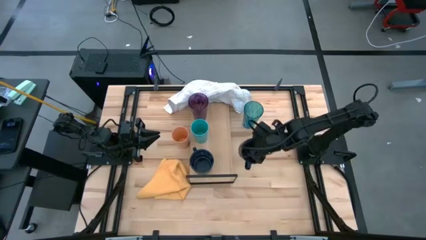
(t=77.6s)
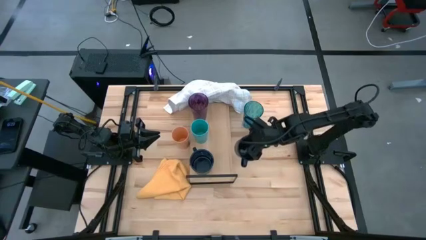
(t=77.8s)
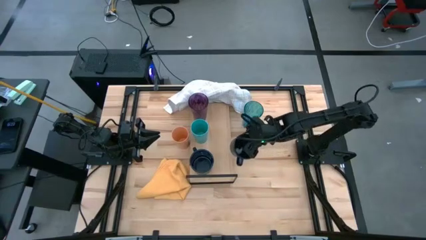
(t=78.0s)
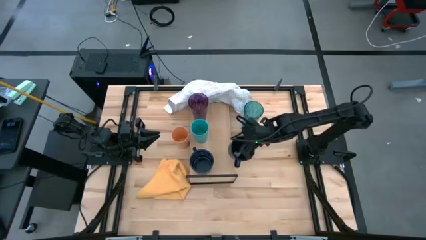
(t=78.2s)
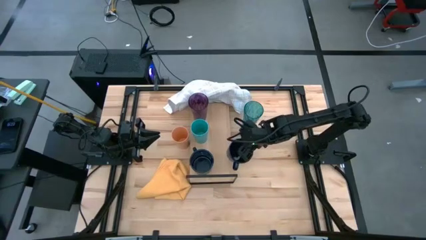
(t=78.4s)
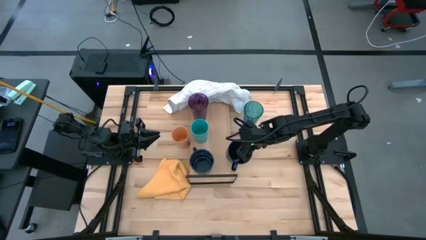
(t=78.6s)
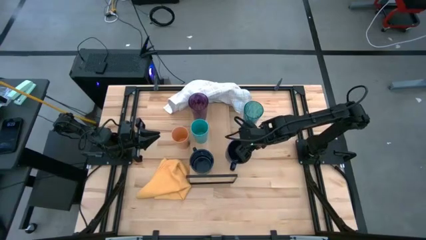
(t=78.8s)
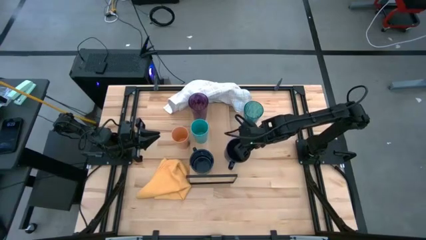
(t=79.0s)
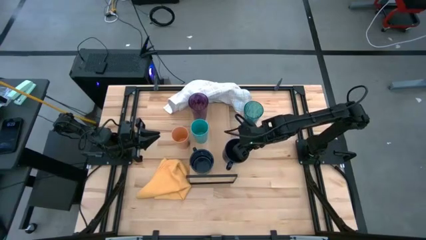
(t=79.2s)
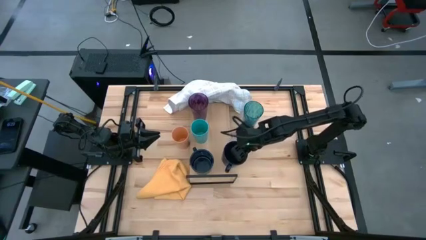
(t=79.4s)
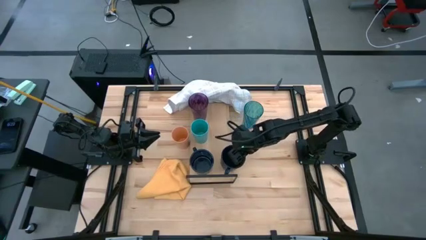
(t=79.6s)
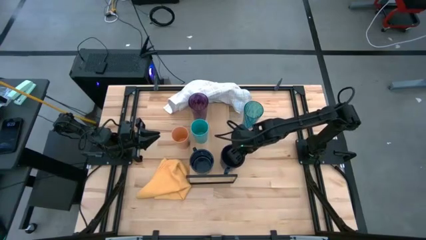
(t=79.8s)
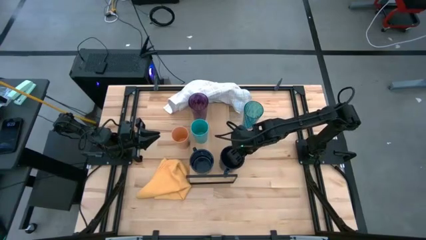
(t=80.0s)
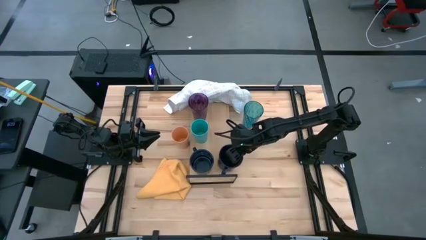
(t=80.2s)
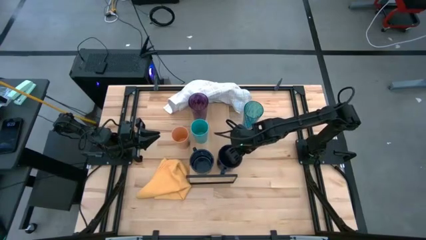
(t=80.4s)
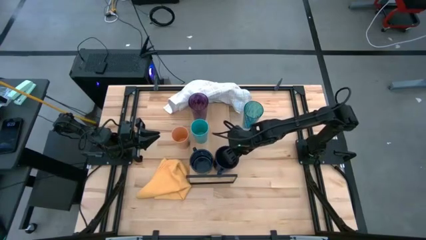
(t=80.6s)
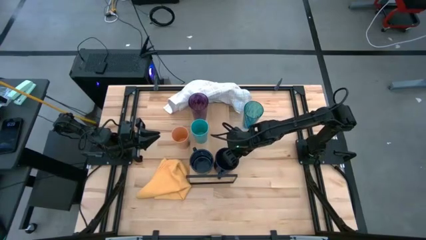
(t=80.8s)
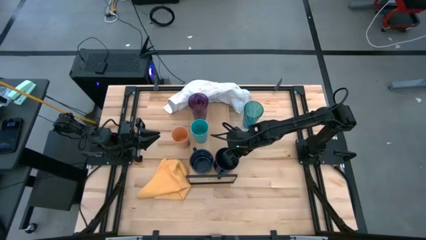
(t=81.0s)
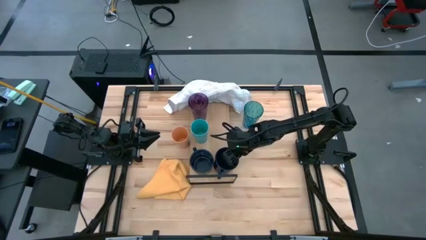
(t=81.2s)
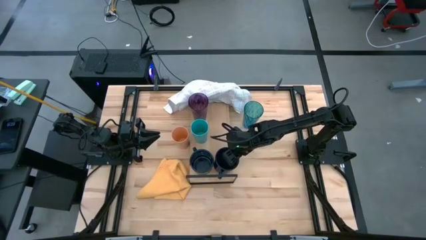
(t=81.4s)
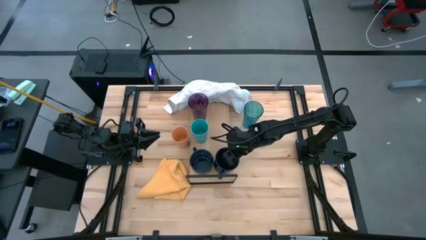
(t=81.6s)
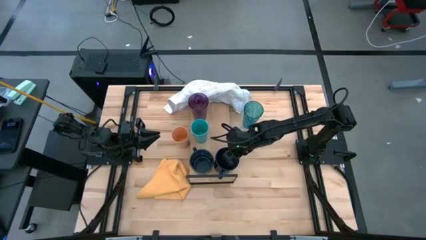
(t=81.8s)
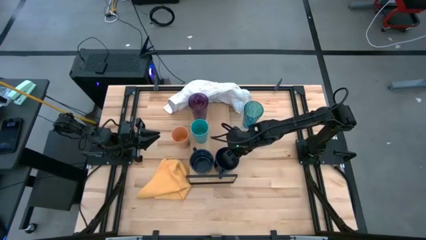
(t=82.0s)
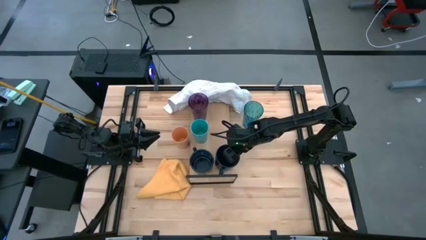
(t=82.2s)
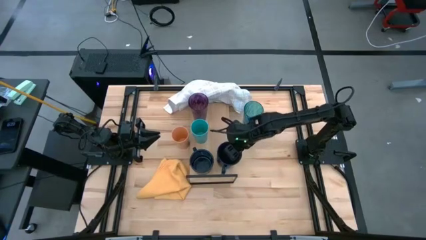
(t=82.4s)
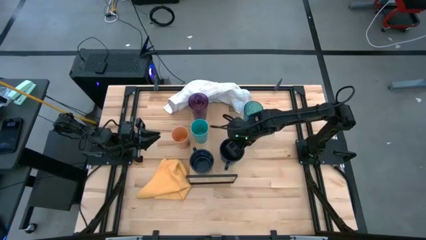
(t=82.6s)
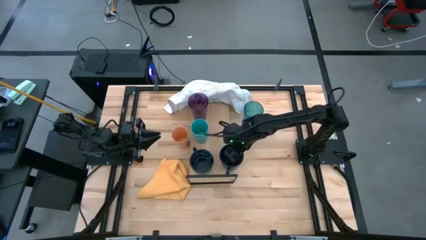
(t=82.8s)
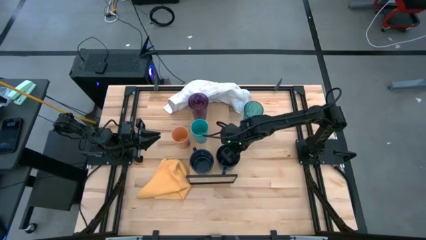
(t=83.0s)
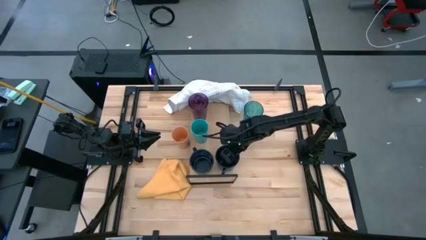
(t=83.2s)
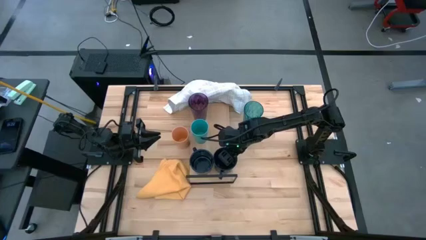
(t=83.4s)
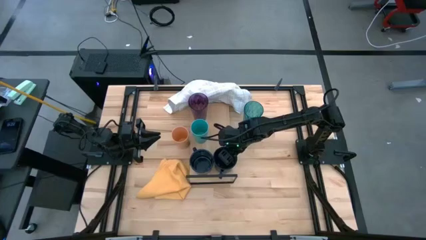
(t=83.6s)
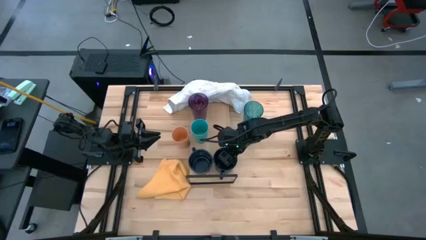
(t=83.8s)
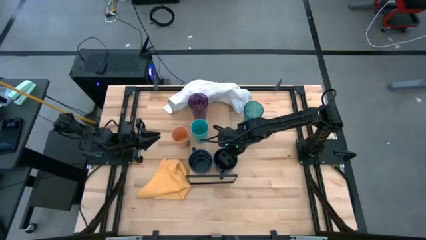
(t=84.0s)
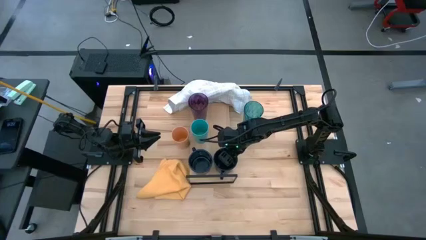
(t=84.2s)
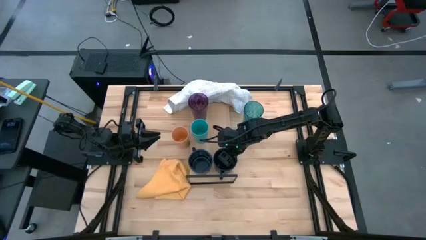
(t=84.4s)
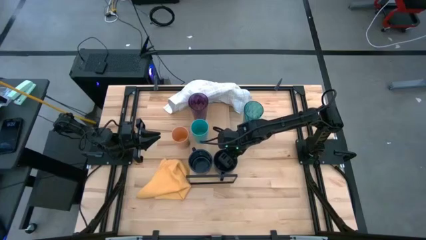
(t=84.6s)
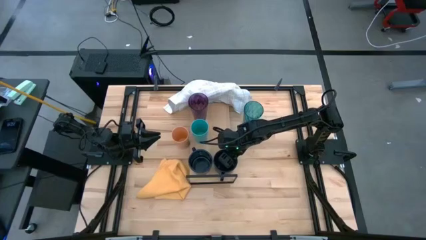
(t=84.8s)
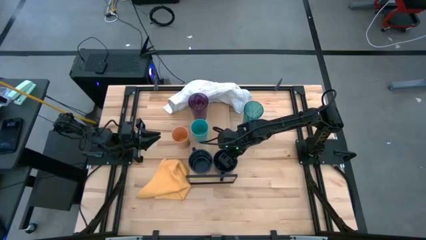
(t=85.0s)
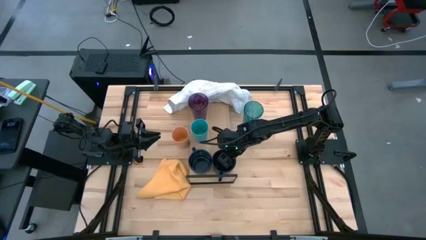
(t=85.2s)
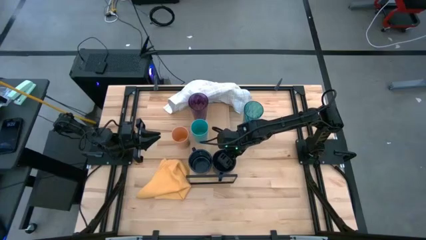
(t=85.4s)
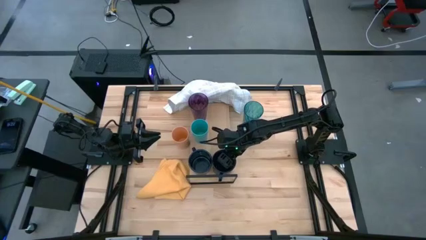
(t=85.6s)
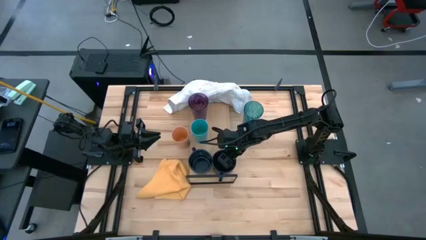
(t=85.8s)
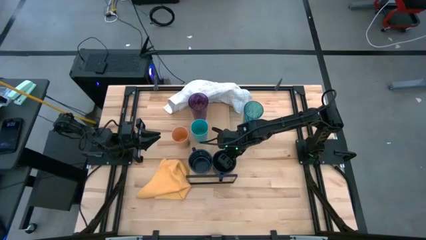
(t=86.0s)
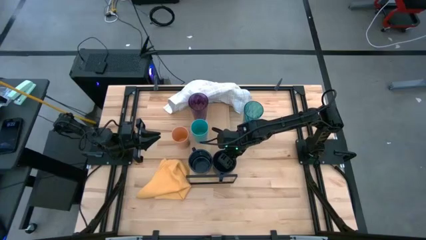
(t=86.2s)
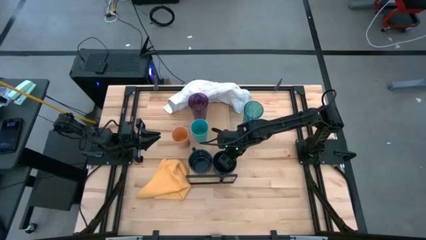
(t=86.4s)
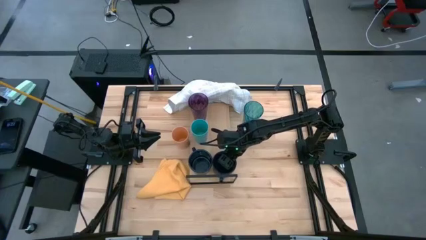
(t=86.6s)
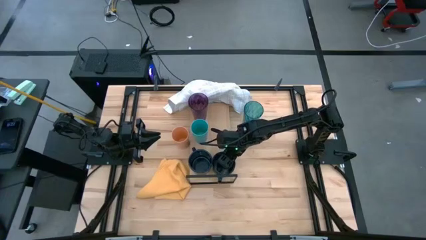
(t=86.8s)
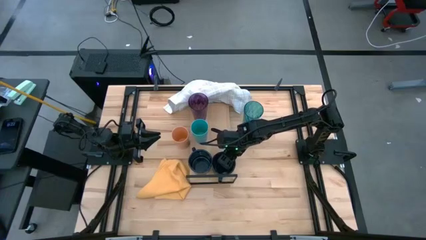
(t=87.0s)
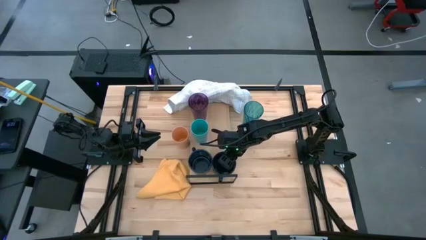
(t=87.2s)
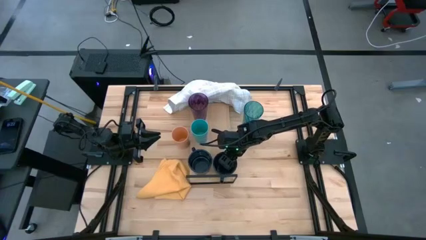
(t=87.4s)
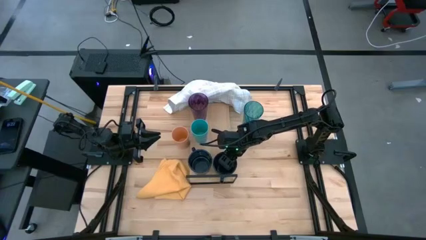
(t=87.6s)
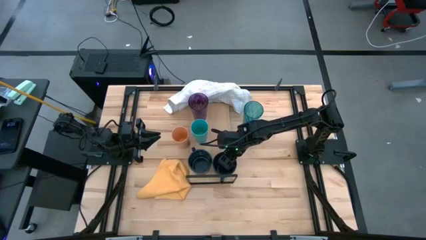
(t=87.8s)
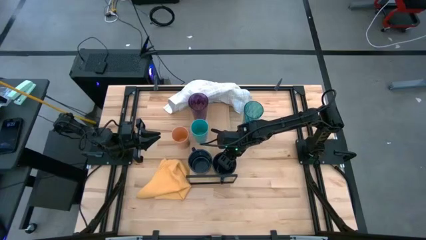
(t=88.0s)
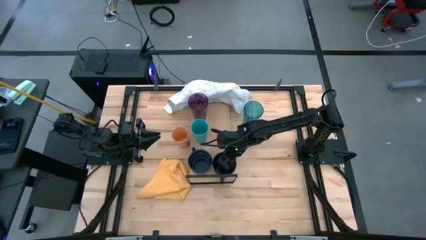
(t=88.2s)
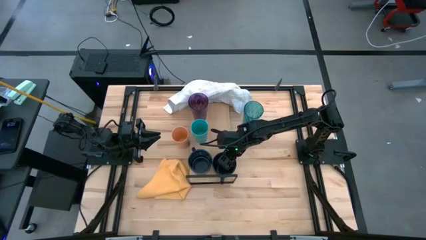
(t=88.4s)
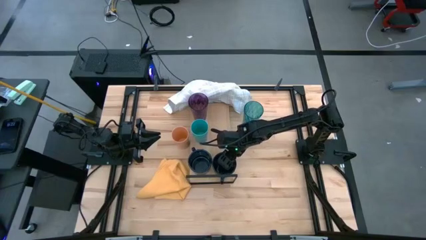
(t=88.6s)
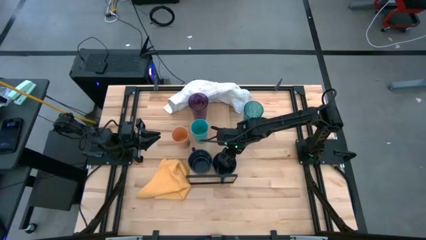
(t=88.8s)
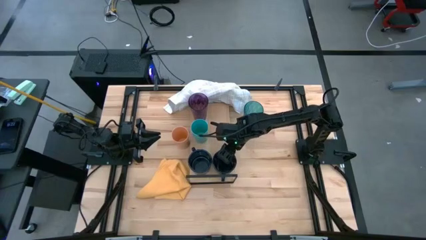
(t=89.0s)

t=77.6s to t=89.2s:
Task: Stack small to large cups/mugs on shelf
Align the black mug with the other black mug on the shelf

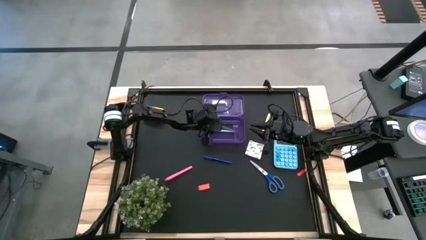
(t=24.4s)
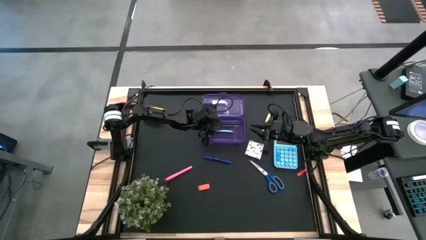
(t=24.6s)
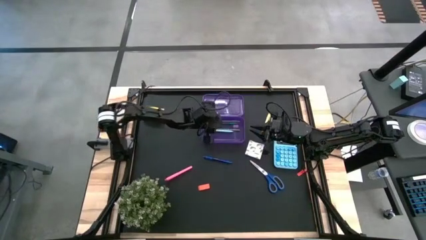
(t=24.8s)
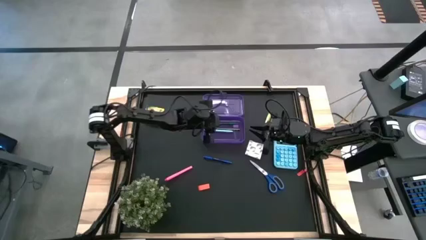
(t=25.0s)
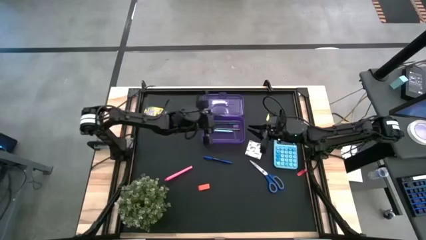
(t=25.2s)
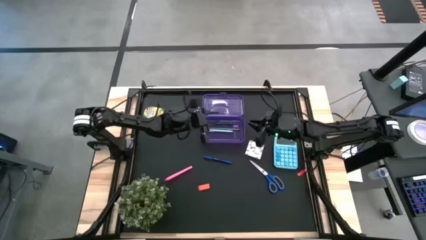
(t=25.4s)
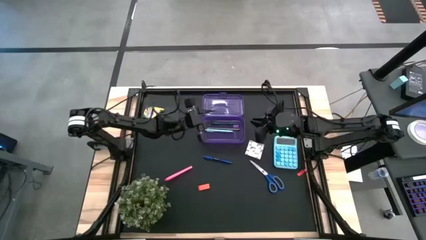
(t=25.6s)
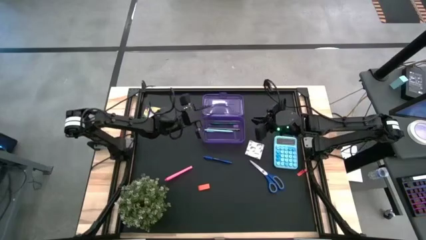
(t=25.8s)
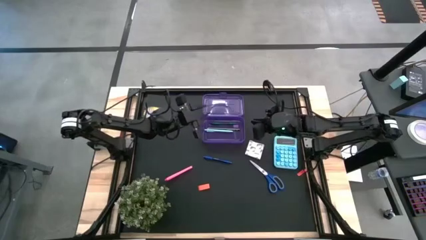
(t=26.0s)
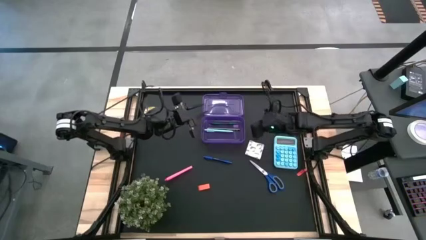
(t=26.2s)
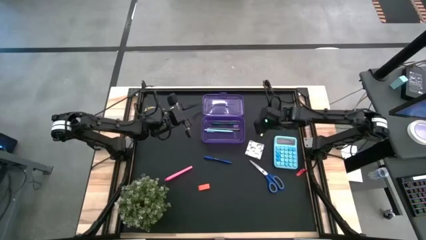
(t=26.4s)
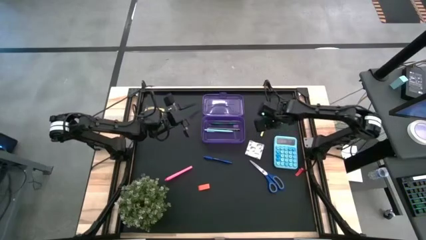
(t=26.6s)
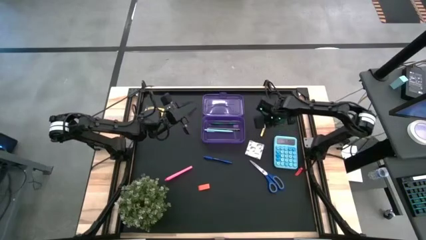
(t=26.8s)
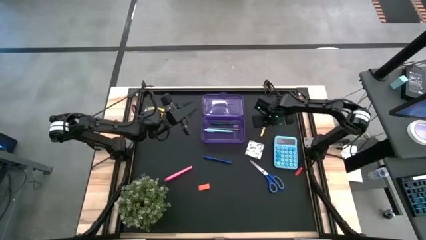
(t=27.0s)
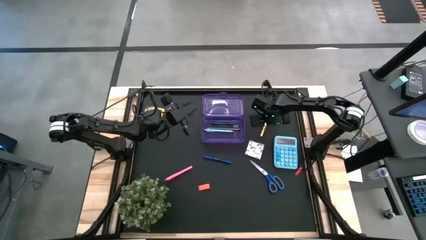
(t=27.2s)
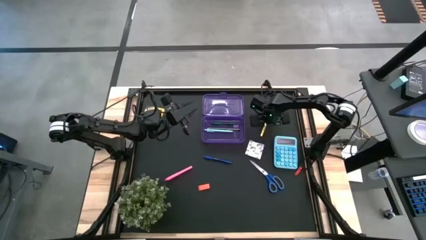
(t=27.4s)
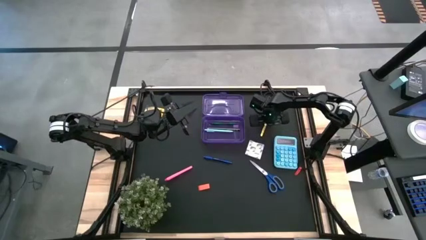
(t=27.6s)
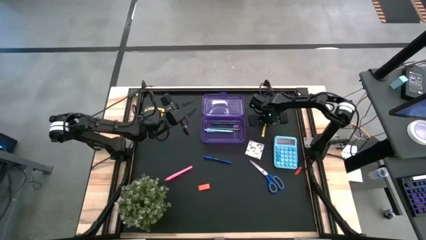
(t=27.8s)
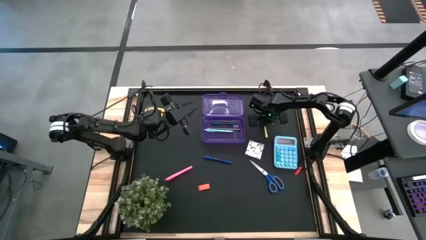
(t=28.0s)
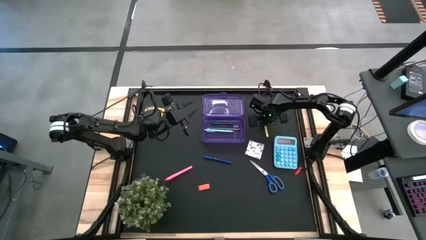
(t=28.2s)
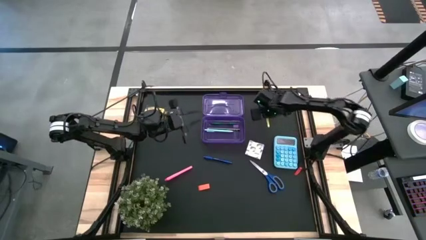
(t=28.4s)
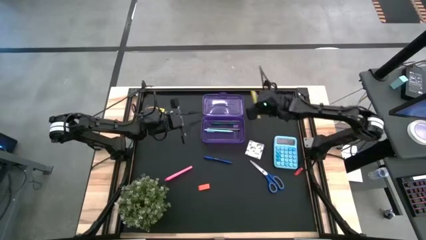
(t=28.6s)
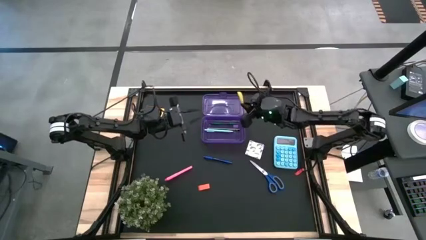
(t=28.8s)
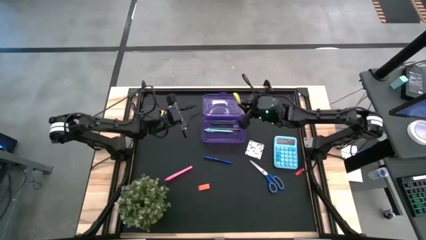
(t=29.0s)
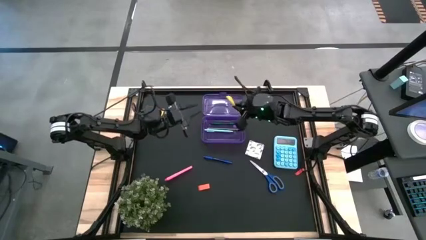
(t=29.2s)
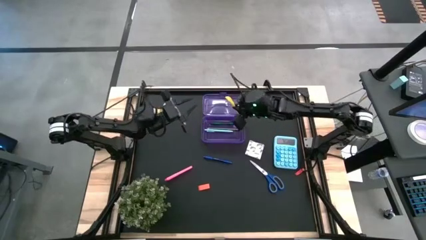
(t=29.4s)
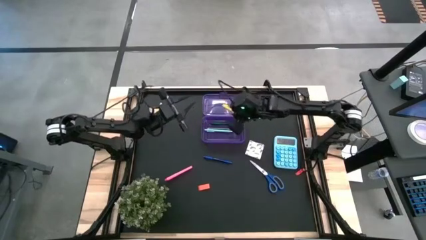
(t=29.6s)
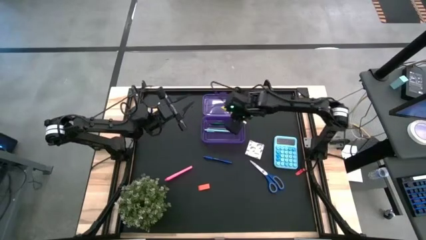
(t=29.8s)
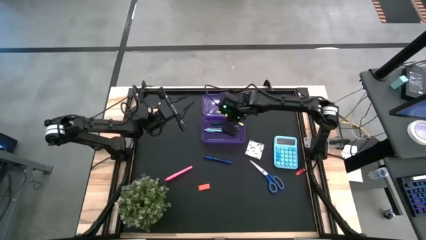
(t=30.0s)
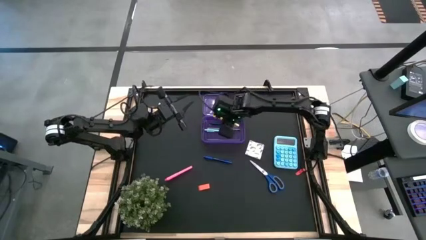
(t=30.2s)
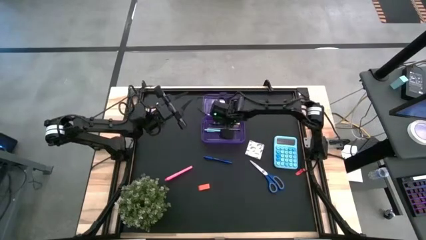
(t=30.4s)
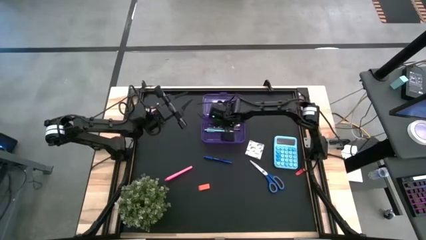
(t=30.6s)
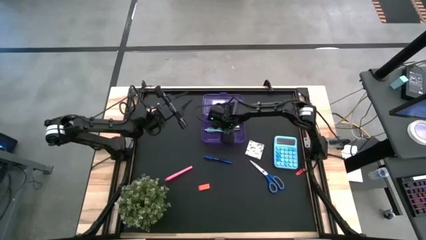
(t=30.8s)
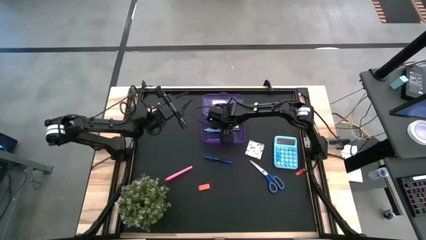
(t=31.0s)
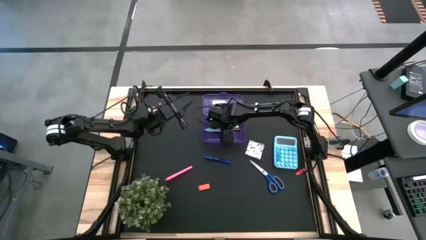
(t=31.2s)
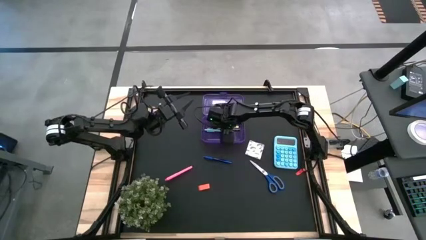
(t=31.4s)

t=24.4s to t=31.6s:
Task: Pack school essentials
Put the yellow pen into the purple box
